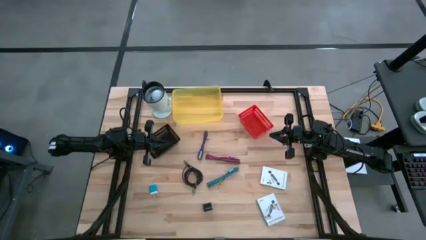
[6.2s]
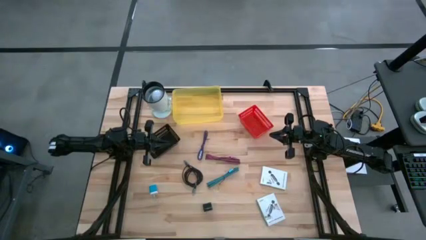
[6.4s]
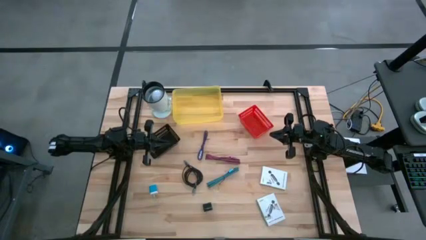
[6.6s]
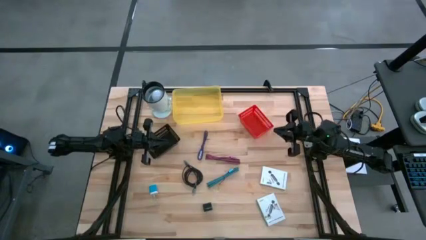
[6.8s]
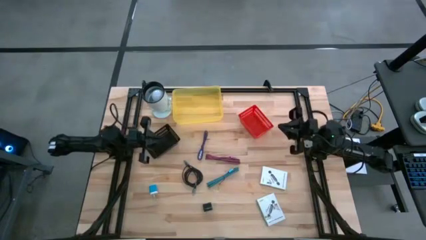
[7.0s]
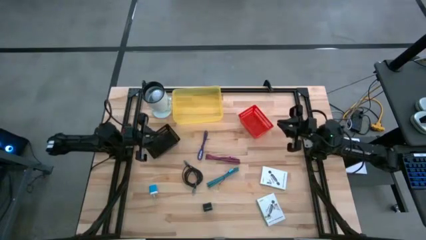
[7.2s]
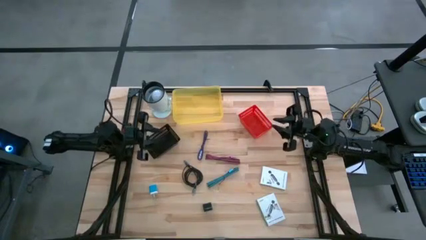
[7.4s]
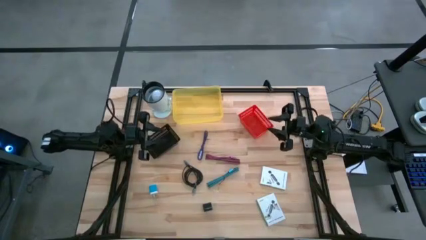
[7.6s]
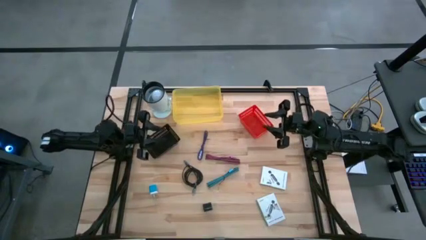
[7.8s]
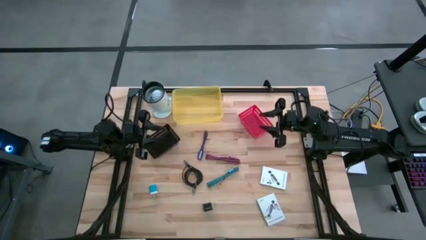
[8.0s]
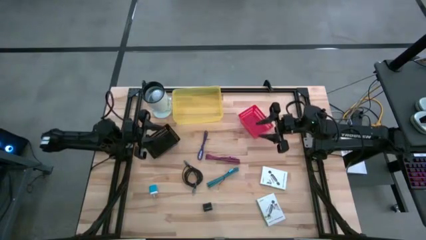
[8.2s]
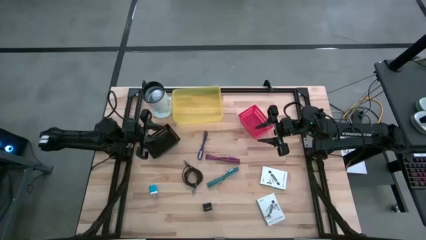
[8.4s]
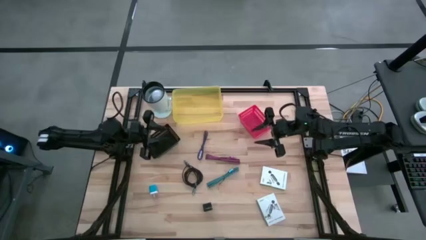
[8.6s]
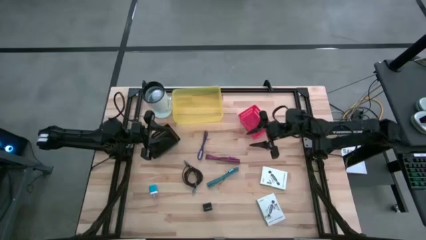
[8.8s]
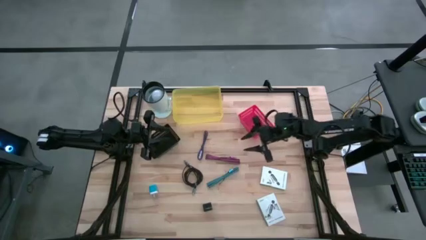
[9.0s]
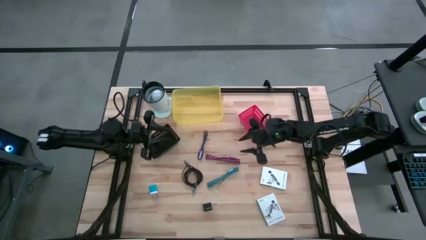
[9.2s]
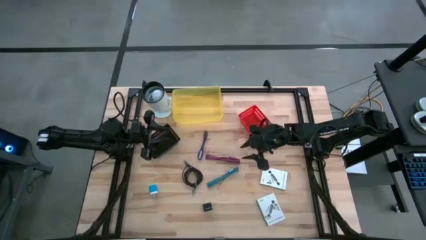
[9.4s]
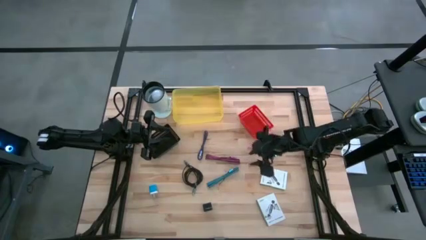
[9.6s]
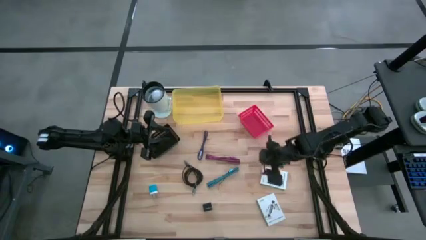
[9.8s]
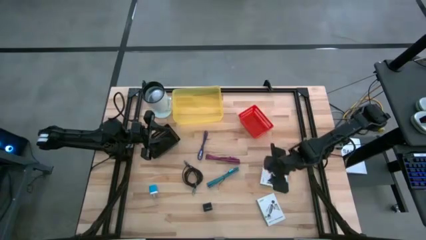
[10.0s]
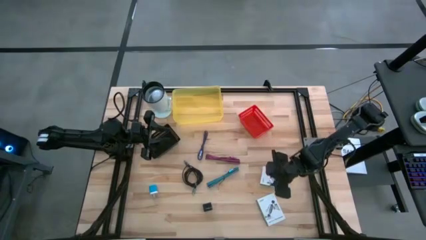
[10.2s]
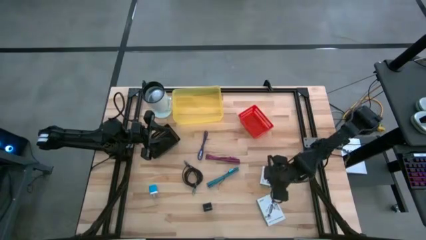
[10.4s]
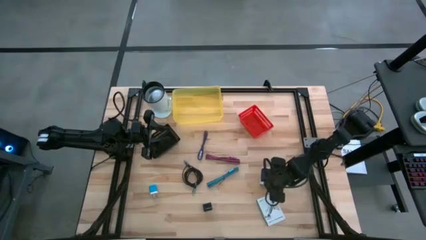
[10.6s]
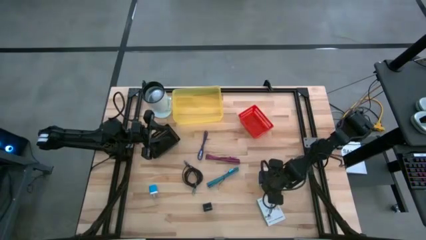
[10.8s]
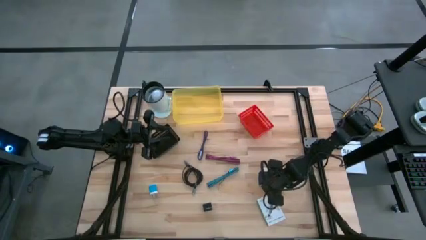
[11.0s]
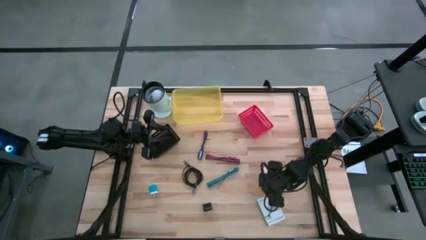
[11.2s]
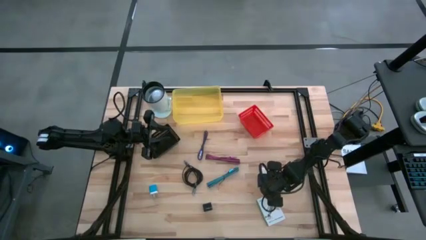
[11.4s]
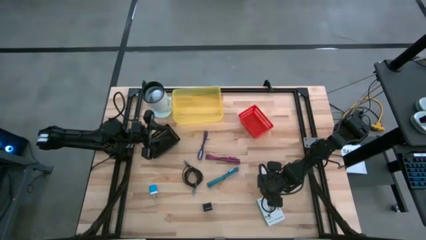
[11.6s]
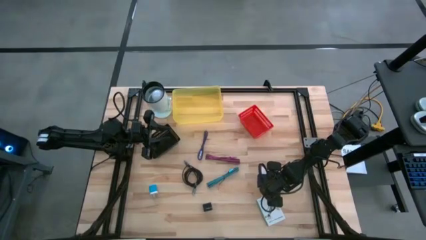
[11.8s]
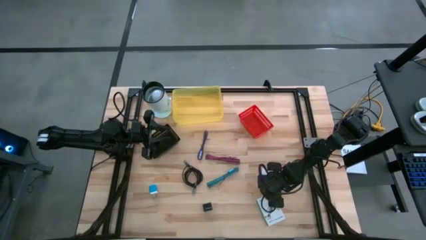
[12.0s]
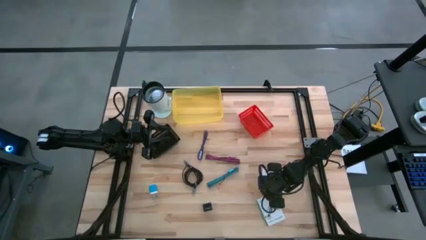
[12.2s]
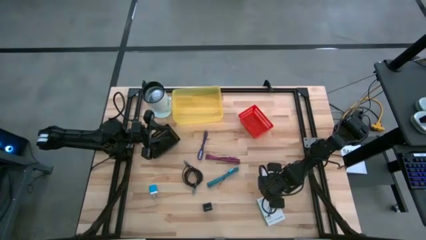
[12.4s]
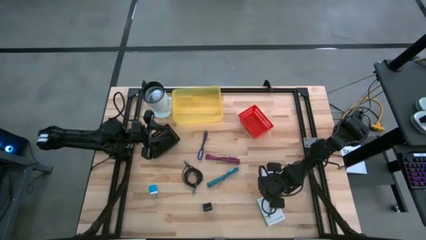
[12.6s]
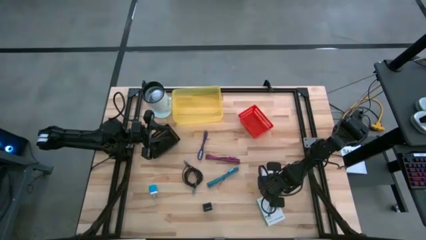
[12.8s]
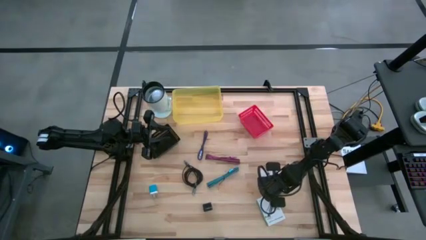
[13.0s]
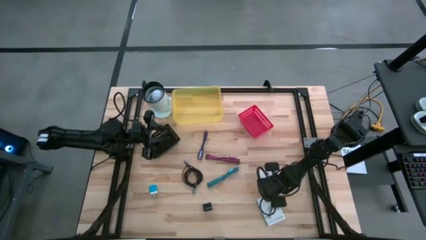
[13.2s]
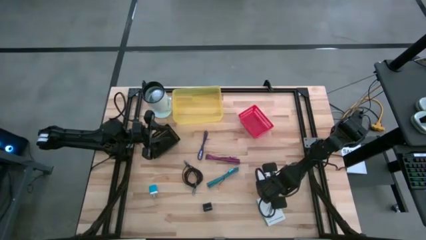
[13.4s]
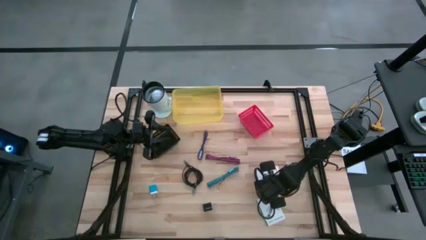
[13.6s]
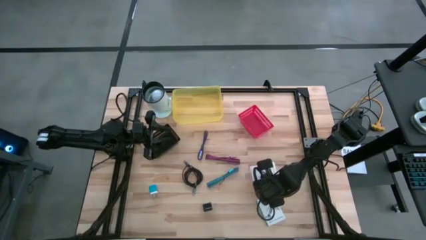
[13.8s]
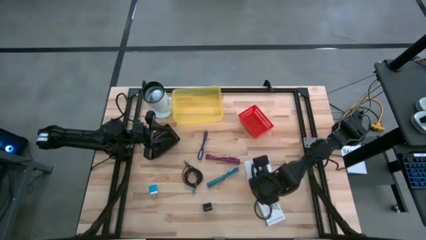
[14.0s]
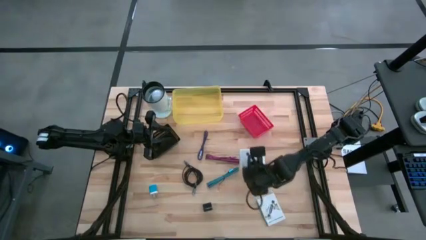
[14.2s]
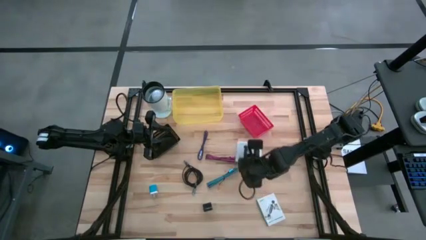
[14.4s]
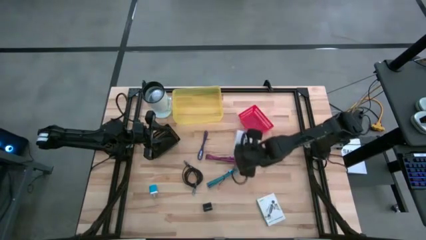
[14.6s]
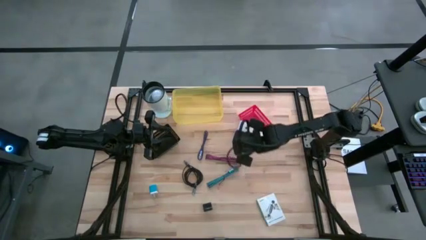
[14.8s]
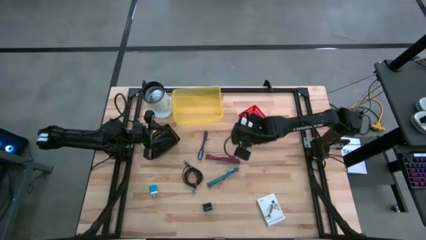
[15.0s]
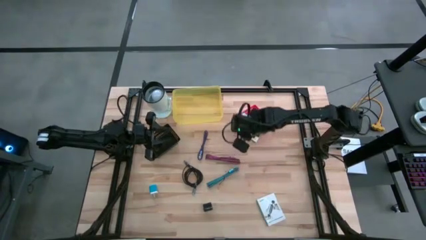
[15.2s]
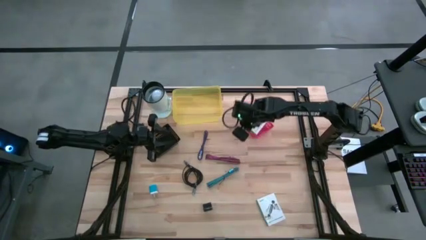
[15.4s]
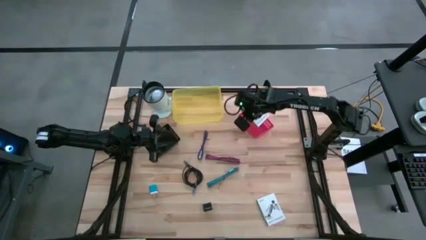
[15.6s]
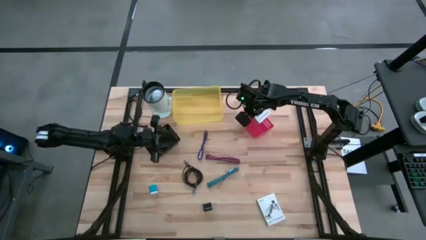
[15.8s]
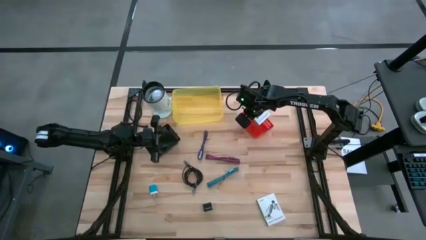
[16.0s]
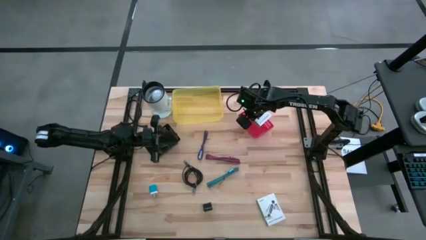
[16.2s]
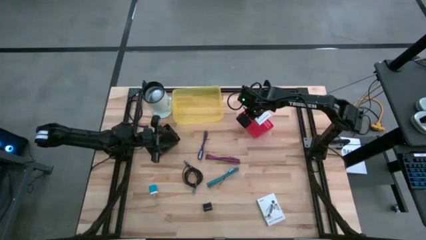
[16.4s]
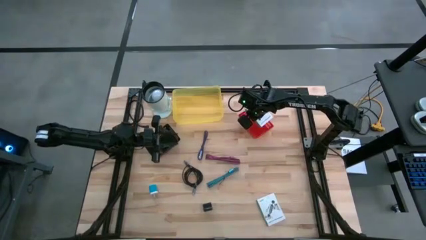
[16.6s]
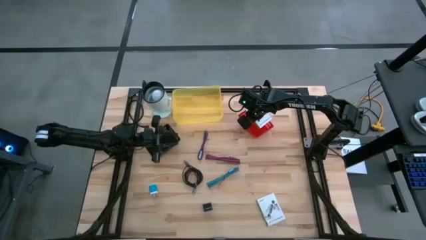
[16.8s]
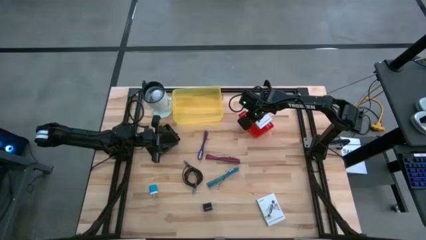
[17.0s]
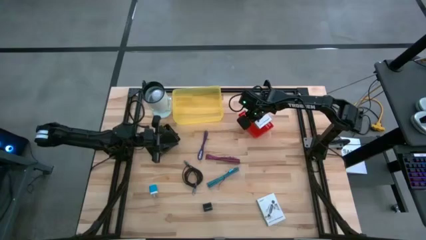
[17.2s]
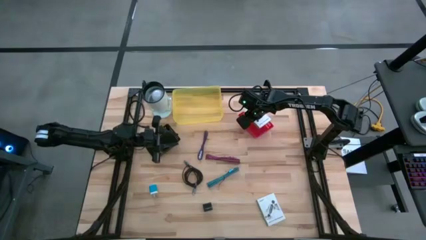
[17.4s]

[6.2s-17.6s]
Task: Pick and place items into bin
Put the top white card reader box into the red bin

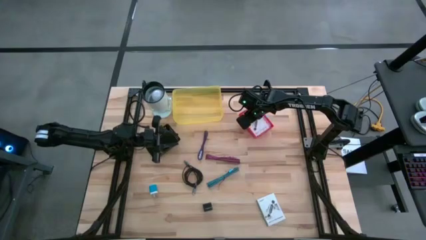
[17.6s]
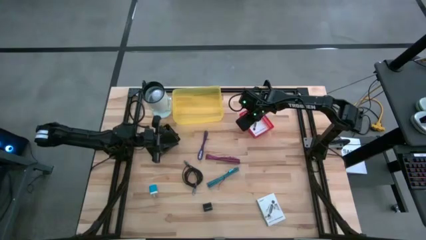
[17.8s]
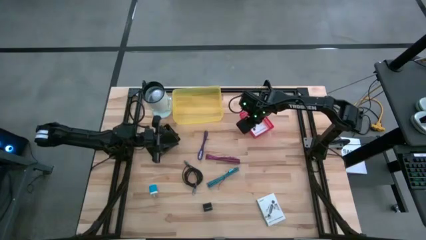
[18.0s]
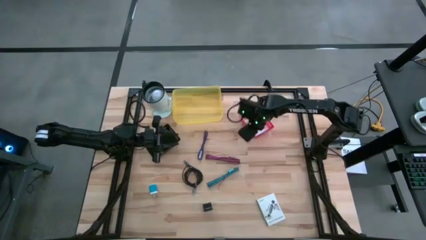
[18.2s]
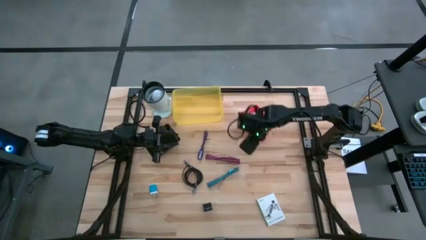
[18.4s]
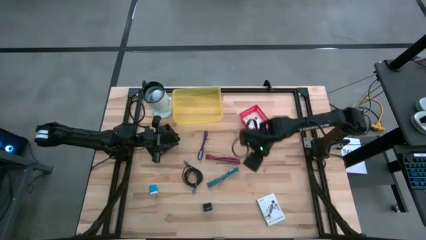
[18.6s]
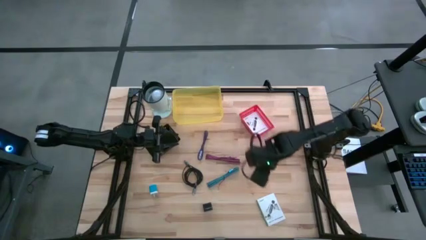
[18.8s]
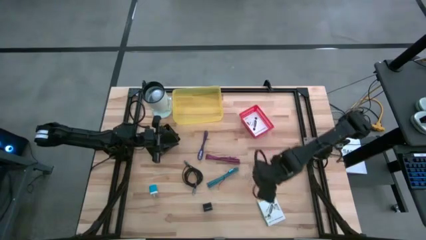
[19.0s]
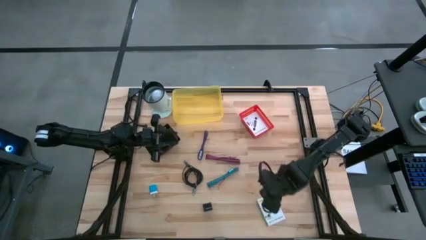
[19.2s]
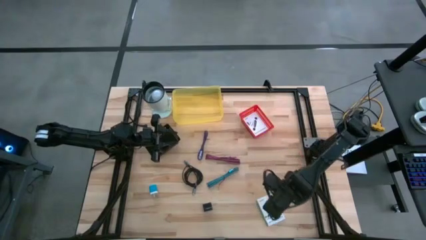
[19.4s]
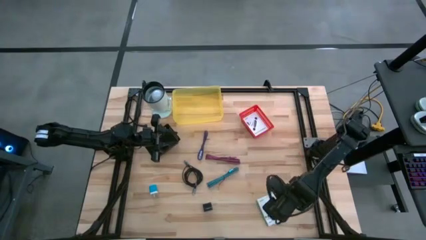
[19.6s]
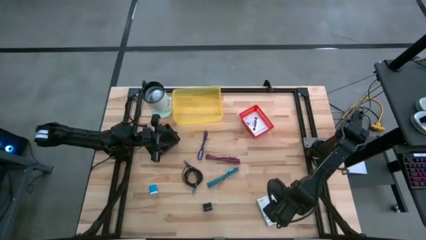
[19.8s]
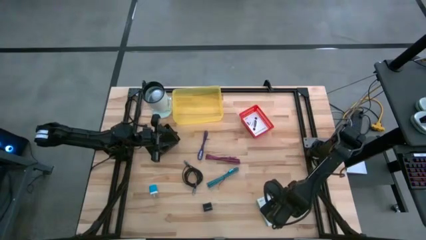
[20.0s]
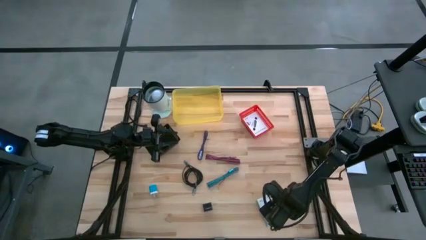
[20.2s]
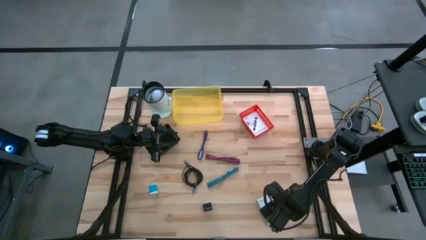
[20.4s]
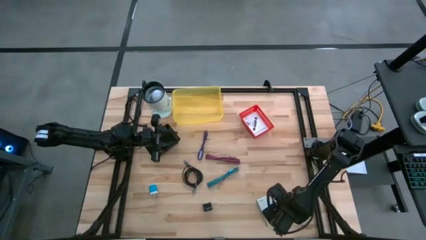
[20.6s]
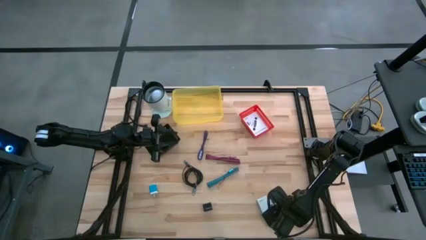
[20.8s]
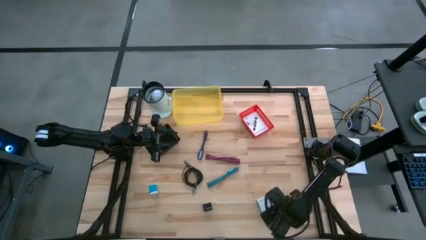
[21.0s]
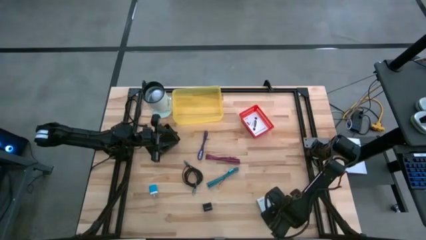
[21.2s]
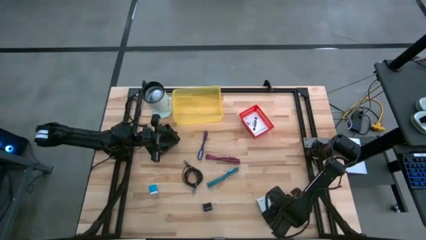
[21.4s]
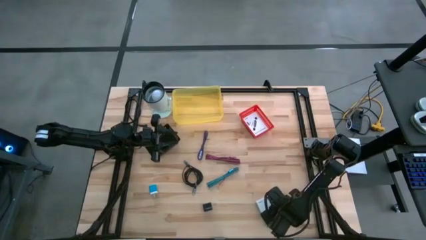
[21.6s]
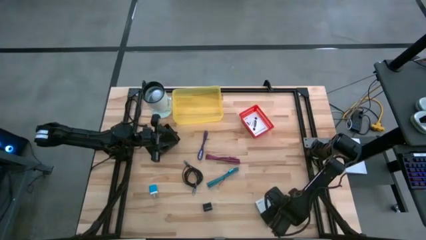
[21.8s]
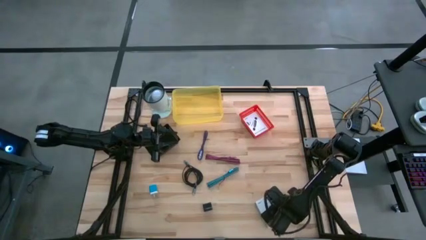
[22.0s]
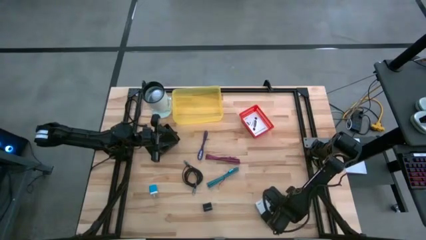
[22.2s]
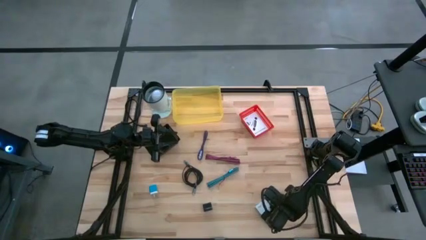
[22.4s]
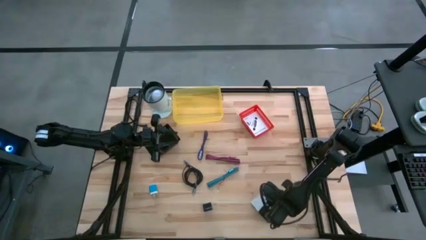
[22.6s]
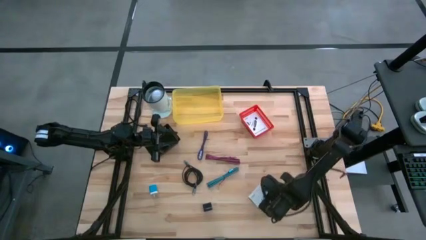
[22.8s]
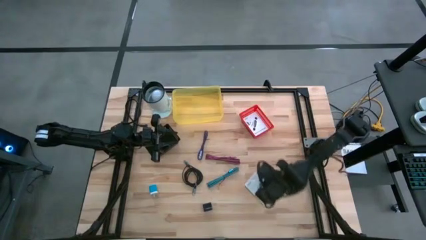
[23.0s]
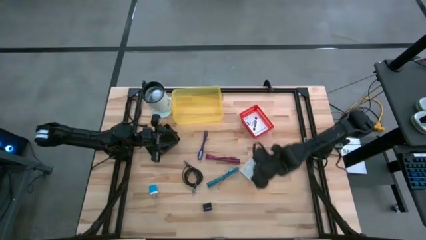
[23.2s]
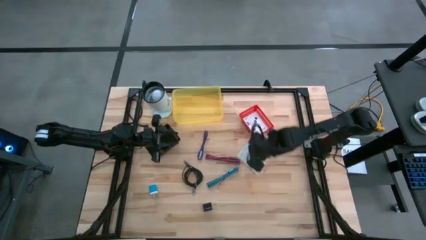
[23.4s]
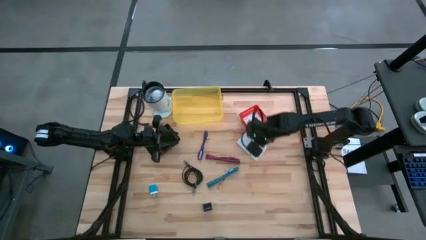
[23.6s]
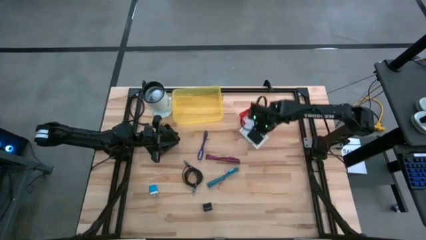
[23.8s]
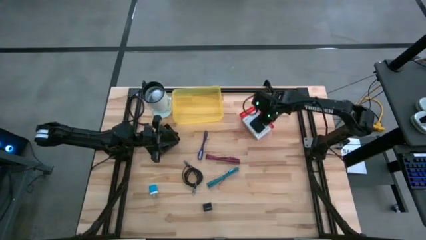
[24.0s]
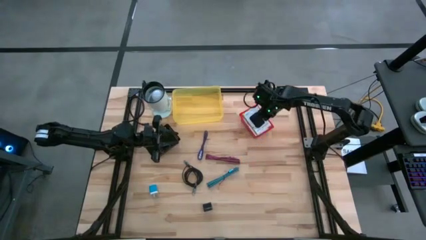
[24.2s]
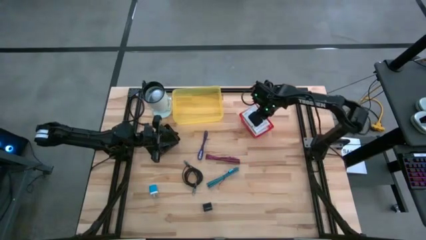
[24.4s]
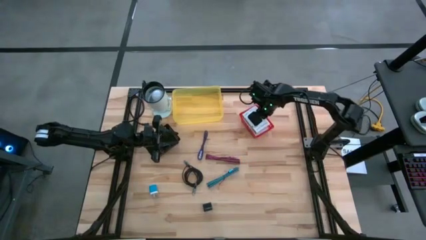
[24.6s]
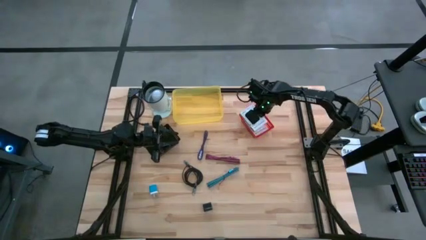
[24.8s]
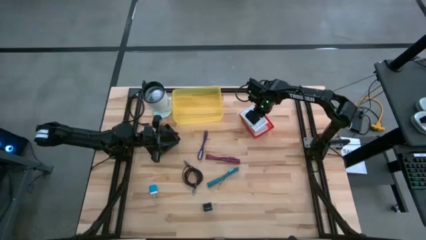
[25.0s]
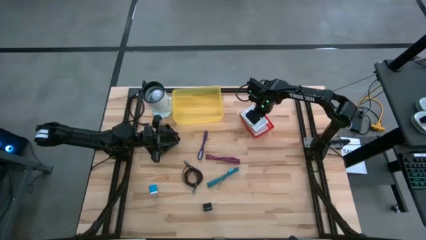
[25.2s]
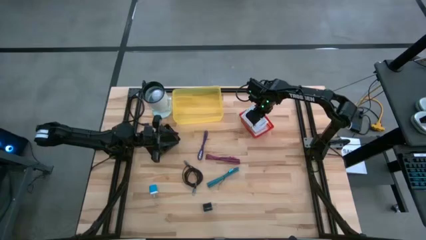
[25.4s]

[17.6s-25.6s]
Put the white card reader box into the red bin
